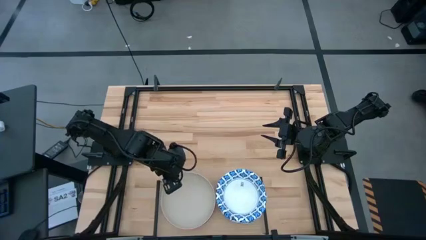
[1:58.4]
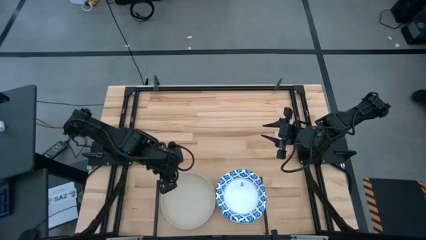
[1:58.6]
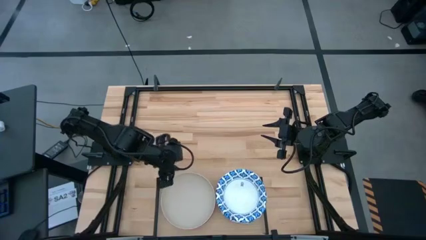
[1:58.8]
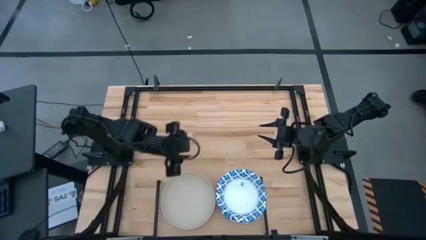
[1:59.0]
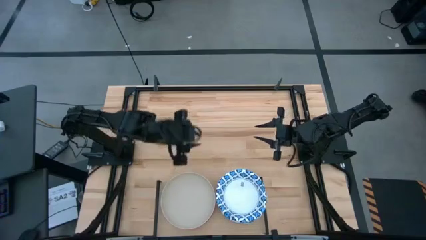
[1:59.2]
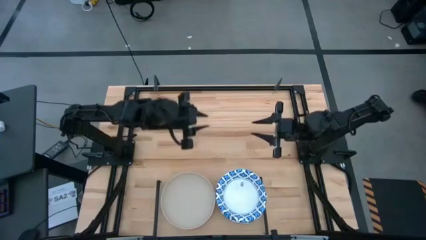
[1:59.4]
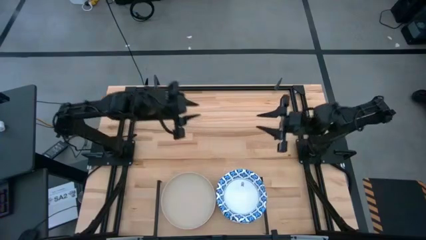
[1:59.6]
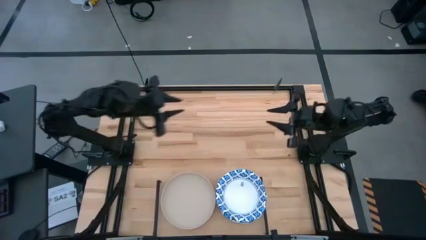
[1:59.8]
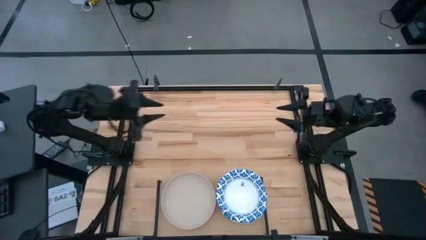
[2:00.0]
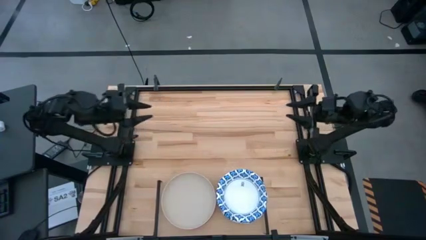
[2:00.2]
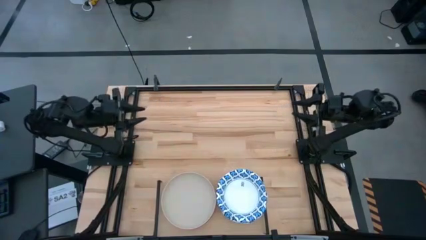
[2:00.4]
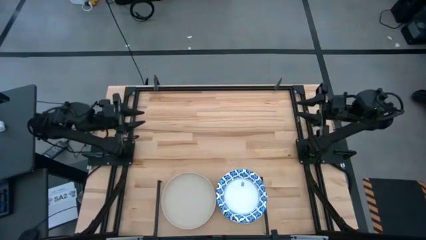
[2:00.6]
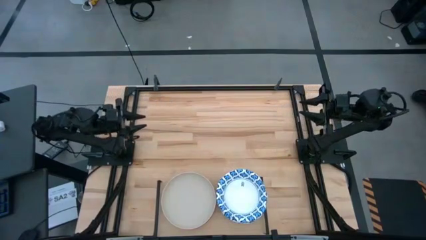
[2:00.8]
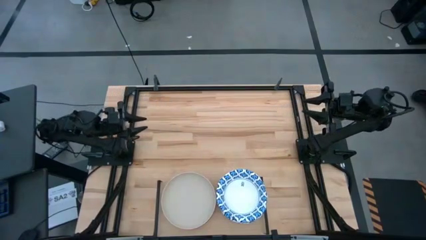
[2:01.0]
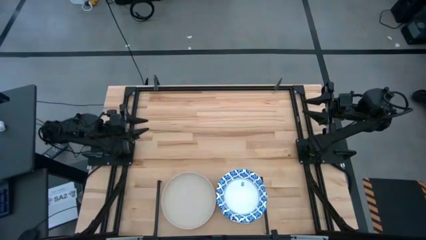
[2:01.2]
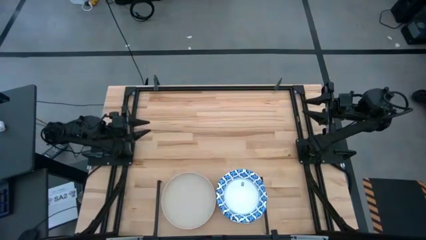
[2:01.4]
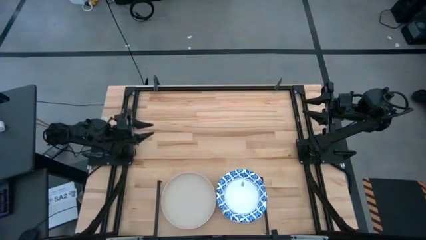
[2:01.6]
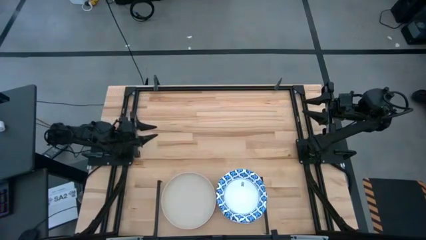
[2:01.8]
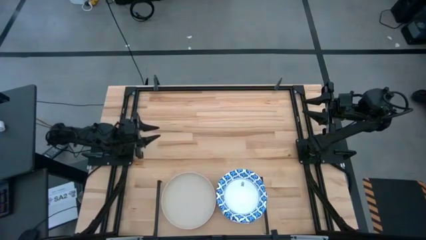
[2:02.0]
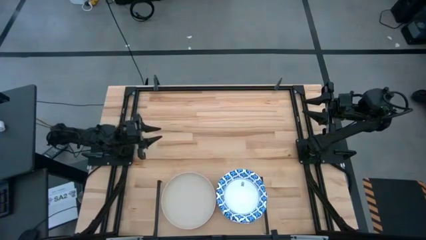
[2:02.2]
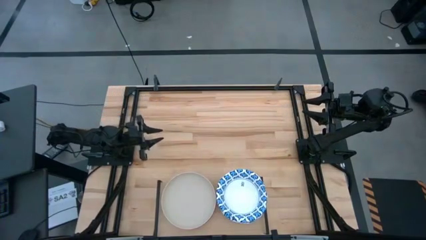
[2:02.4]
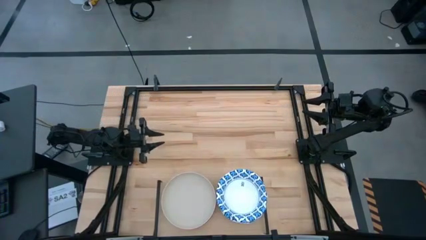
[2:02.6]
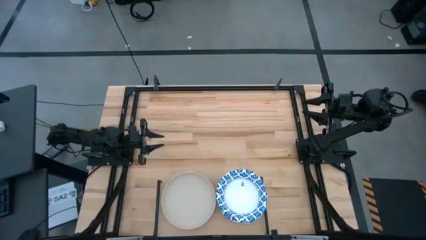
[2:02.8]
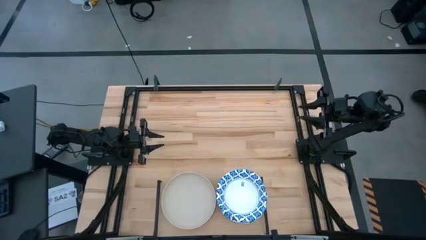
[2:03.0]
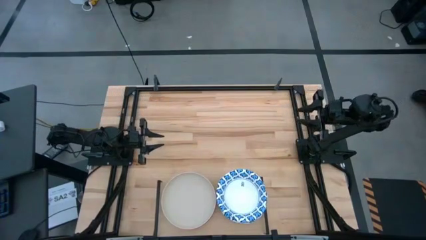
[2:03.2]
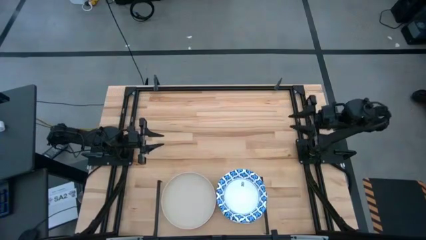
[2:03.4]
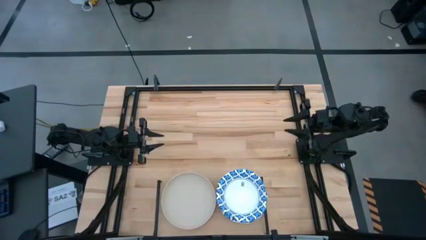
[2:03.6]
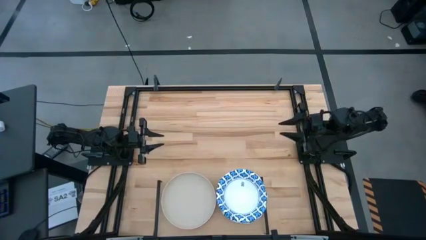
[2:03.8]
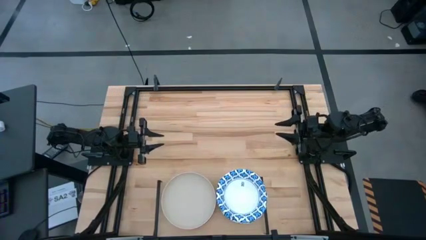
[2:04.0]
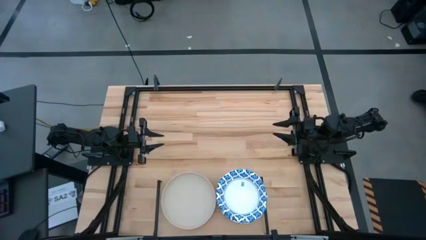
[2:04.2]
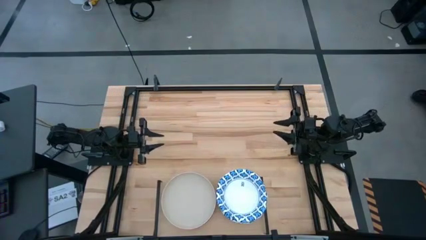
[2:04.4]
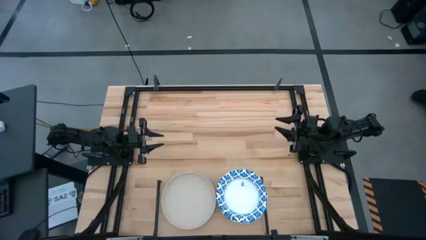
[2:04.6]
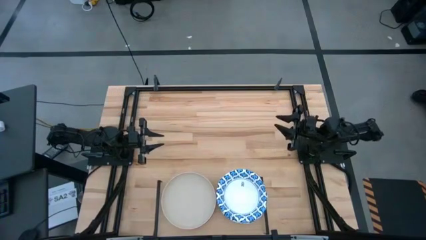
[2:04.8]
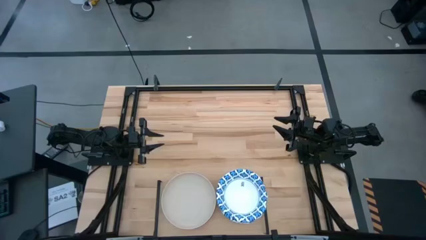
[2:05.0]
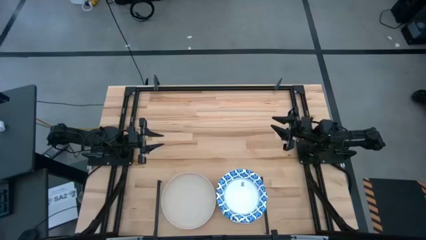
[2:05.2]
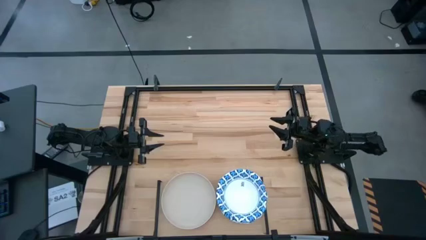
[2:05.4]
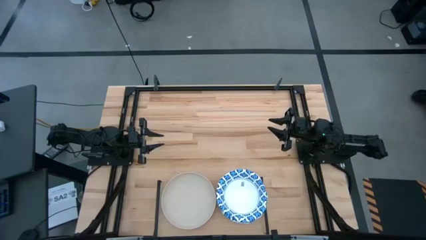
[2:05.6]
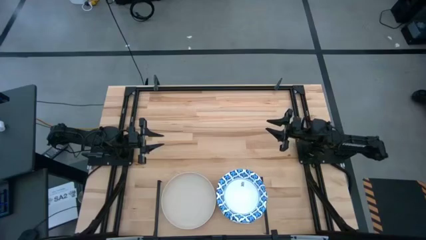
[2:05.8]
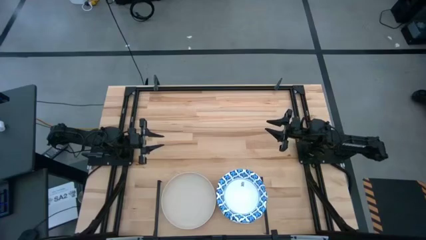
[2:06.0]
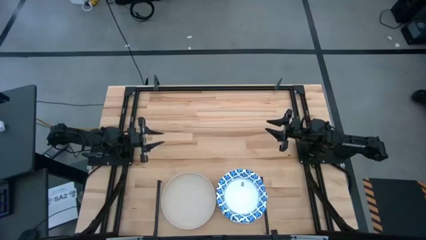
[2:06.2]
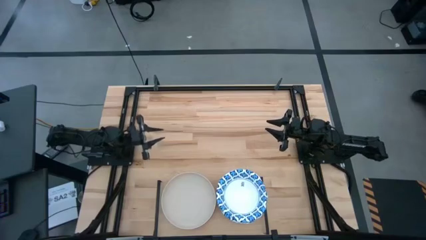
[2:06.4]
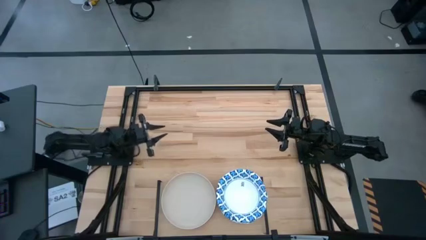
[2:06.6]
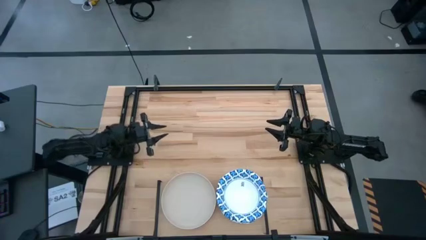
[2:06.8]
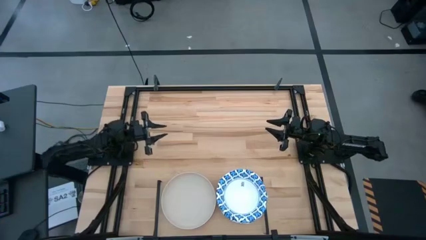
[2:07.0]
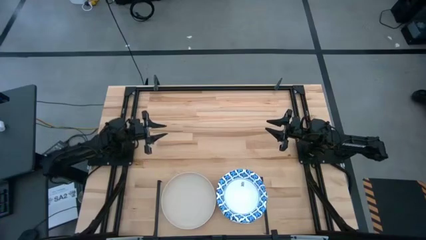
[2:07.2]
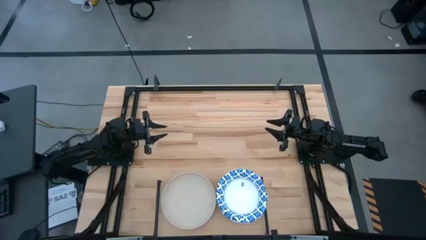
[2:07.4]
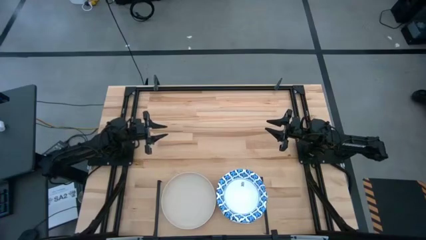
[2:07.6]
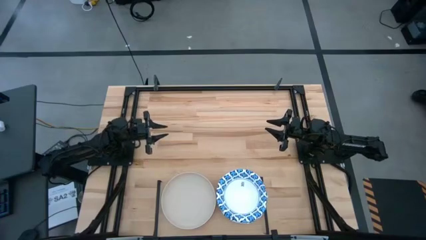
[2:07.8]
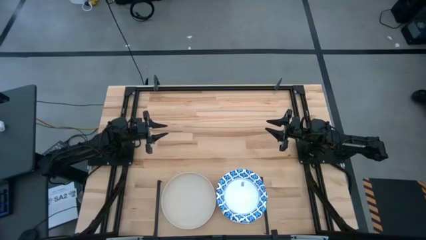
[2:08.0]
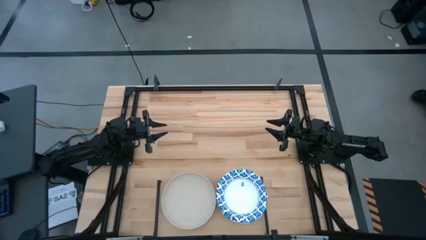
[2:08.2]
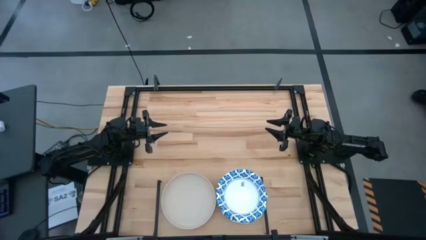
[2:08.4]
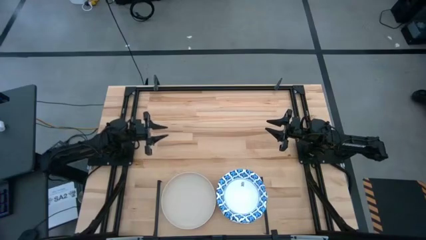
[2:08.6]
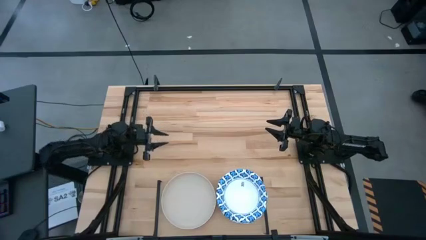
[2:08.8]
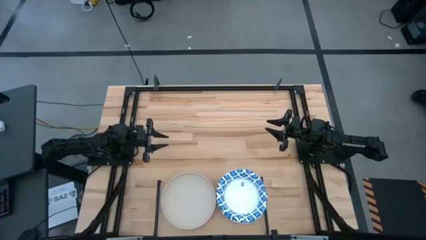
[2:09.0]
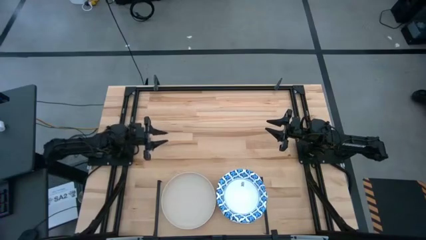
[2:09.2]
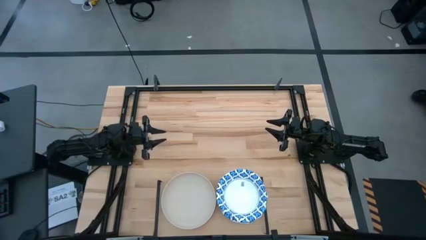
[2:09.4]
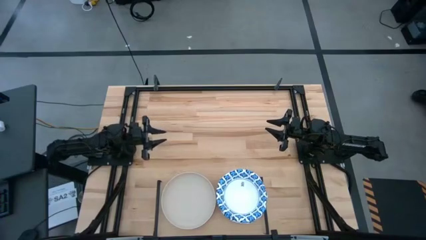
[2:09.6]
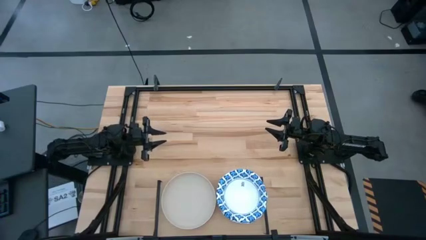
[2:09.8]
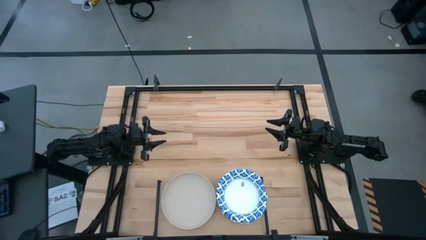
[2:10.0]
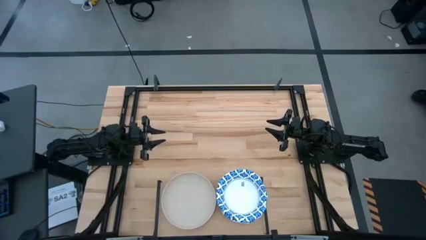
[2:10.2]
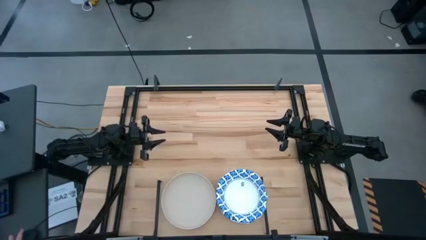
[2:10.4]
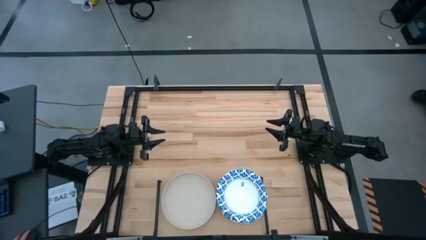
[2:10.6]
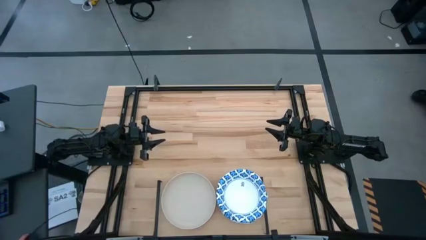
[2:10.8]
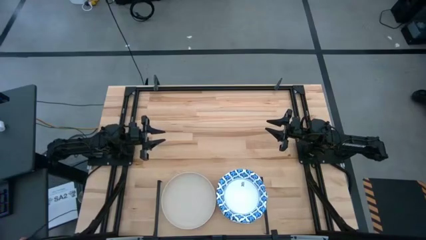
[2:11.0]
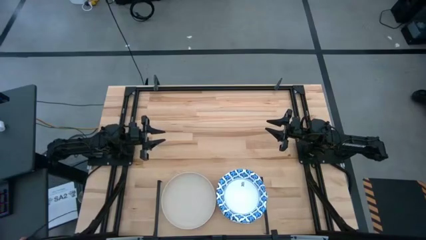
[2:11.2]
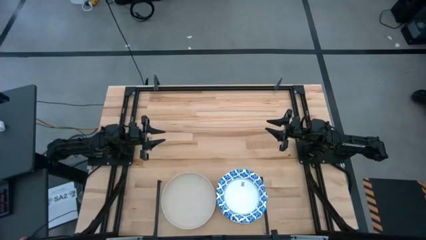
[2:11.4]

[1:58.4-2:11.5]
Task: Place and stack plates onto a shelf
Return to Home Position

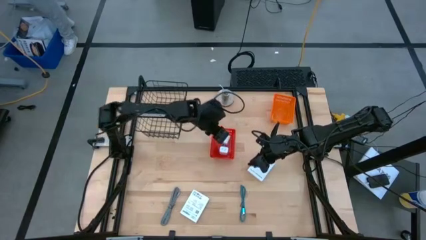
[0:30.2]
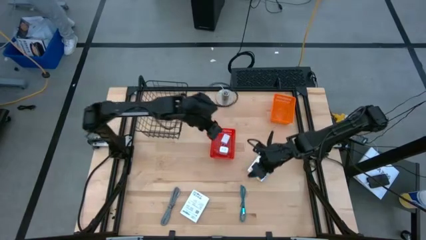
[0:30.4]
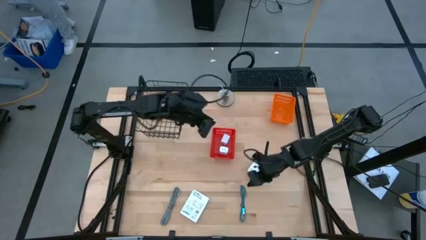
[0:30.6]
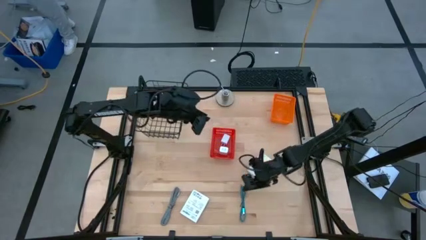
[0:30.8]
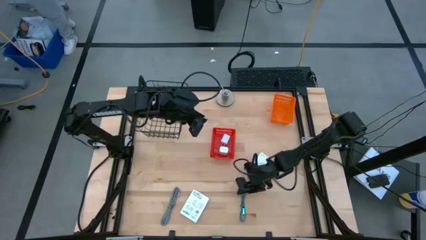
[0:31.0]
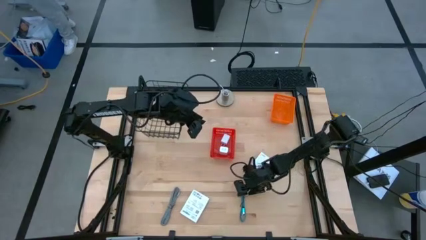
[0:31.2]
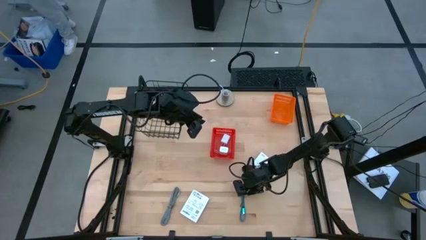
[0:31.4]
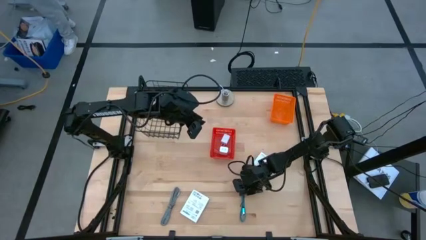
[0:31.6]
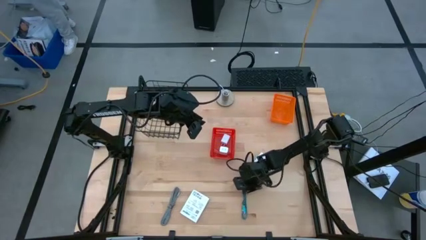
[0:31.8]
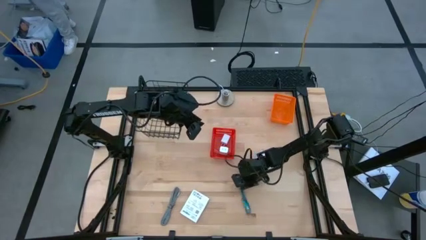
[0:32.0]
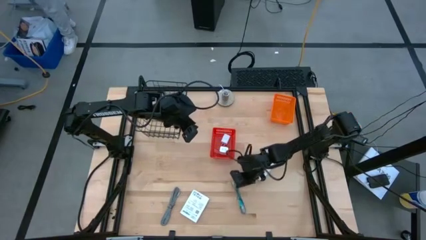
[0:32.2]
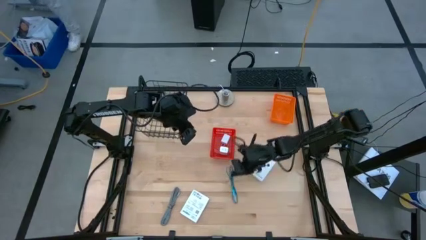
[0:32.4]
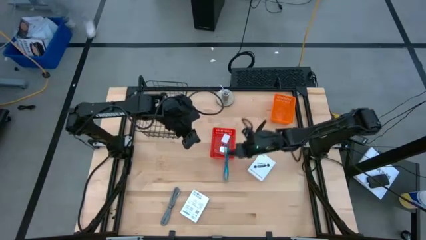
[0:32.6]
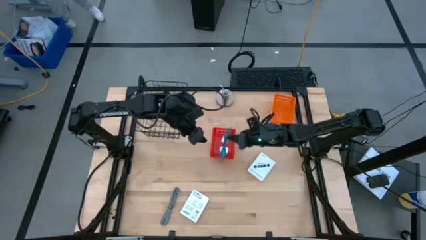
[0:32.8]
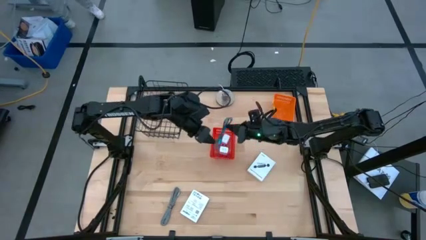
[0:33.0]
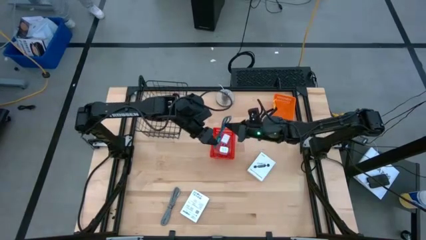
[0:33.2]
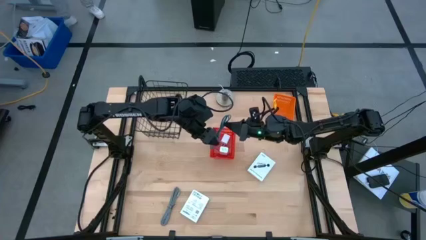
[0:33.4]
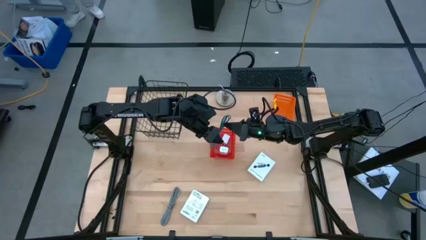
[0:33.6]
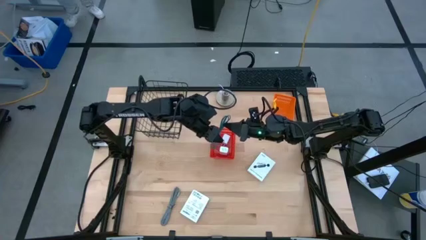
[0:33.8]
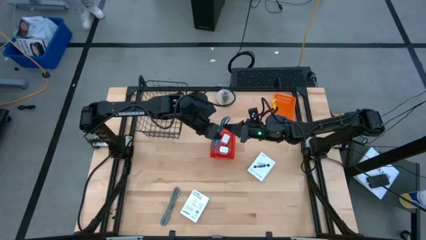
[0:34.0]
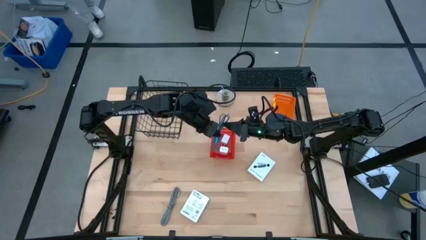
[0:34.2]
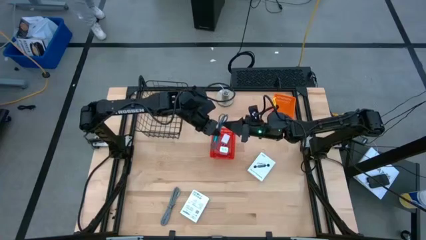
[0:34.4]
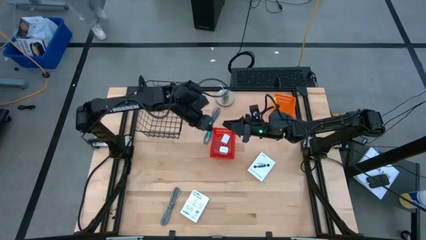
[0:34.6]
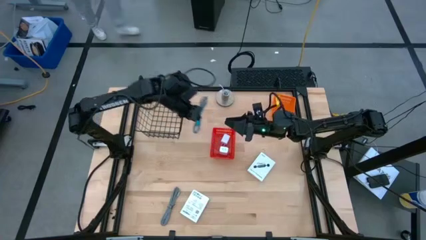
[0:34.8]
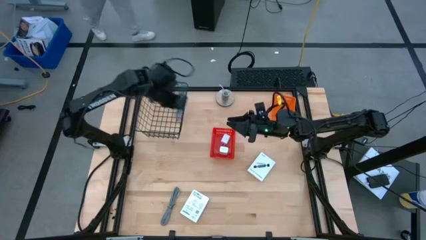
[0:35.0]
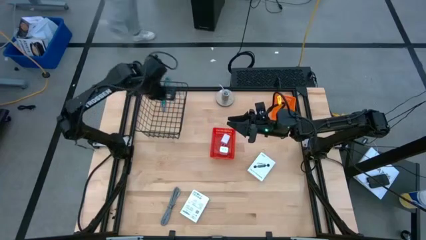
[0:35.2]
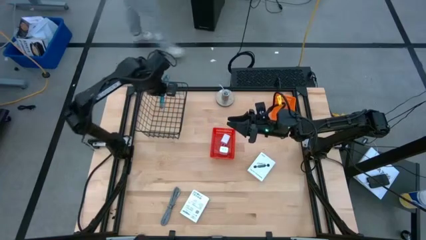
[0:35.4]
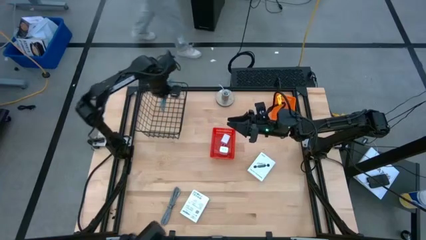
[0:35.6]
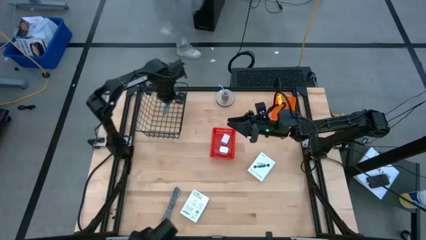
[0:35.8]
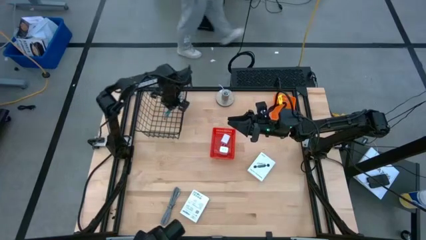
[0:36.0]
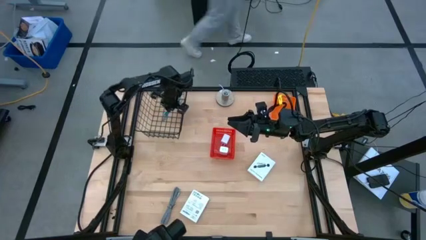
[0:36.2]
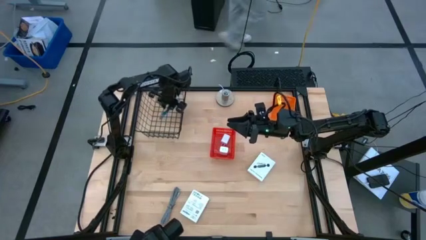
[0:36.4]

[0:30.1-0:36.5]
Task: Pick and place items into bin
Put the blue charger cable into the wired basket
